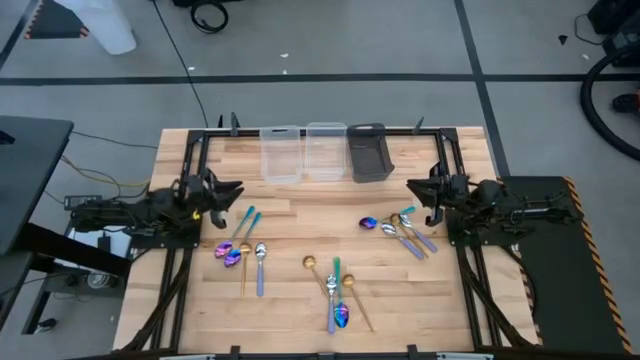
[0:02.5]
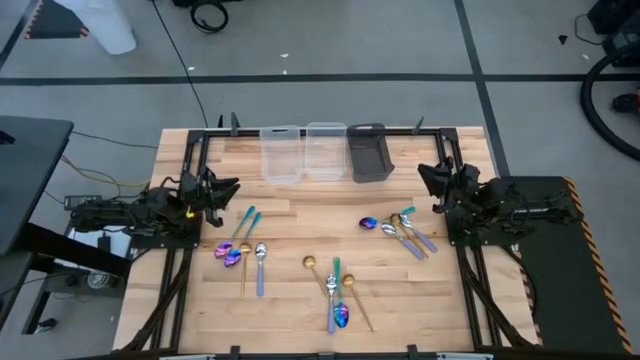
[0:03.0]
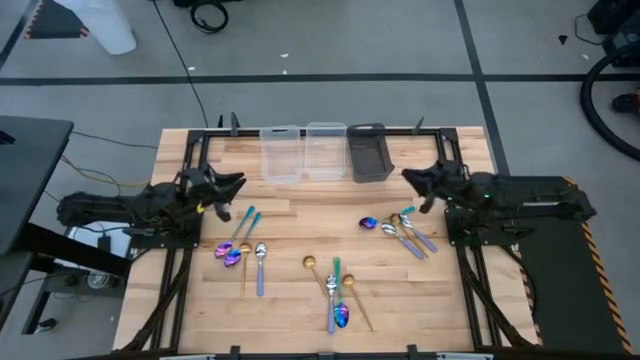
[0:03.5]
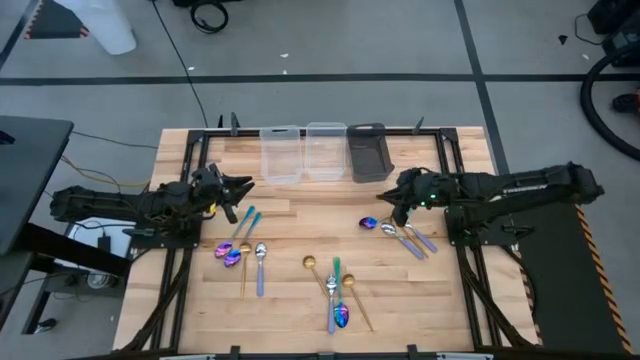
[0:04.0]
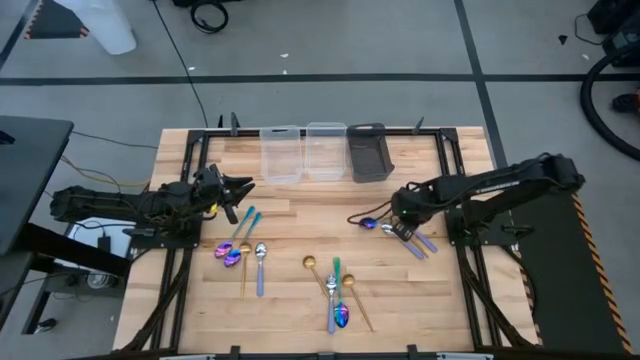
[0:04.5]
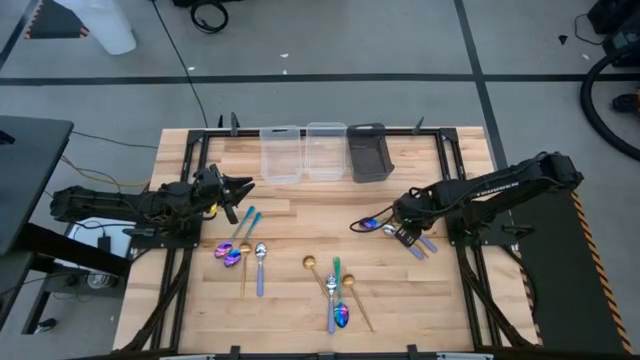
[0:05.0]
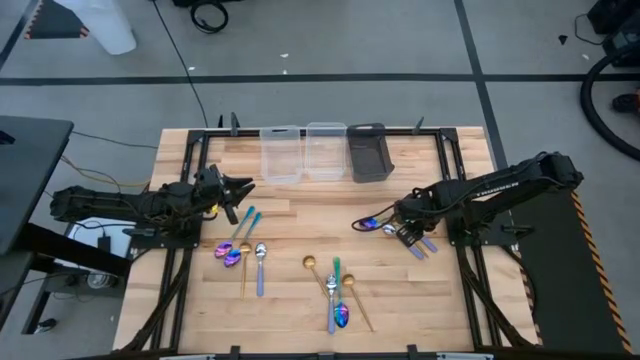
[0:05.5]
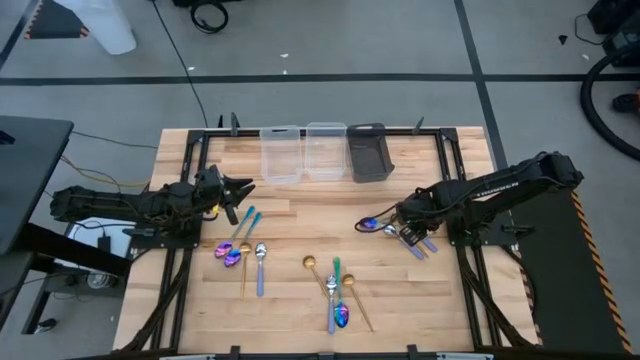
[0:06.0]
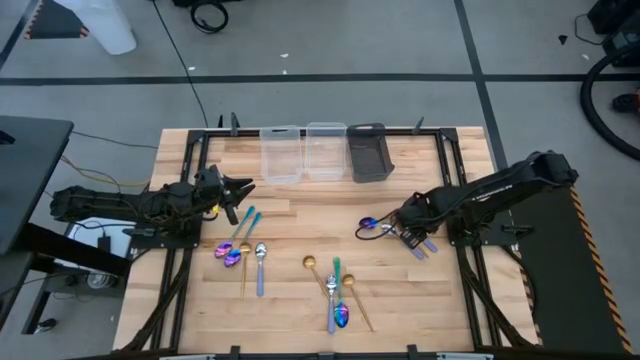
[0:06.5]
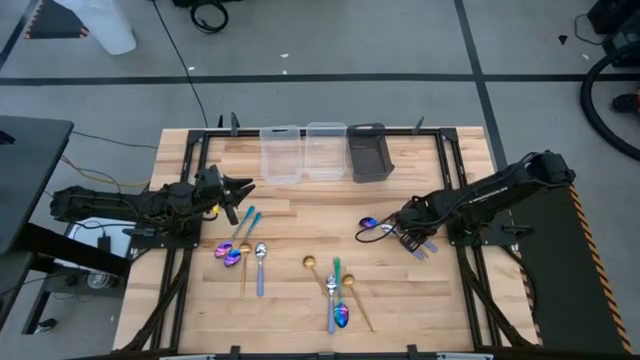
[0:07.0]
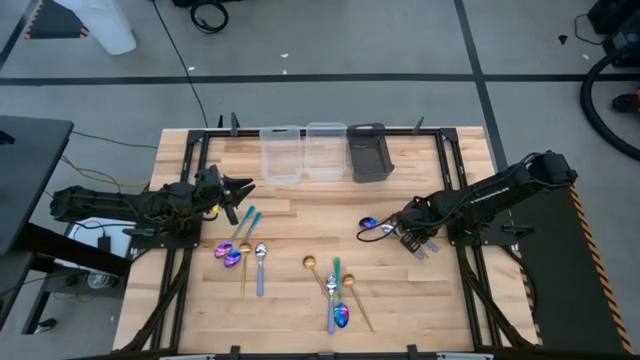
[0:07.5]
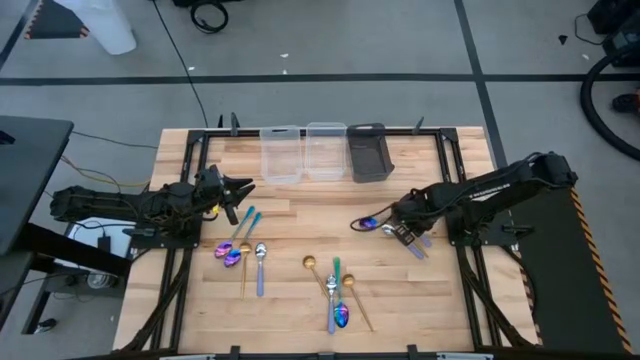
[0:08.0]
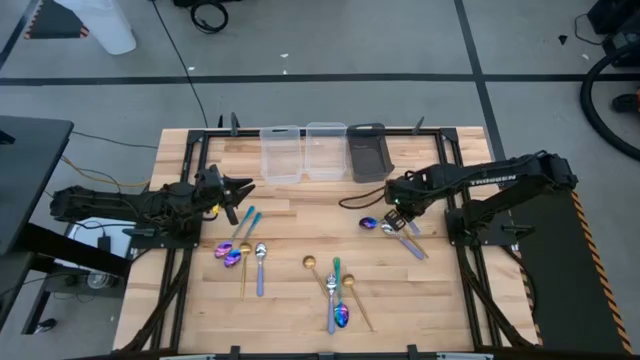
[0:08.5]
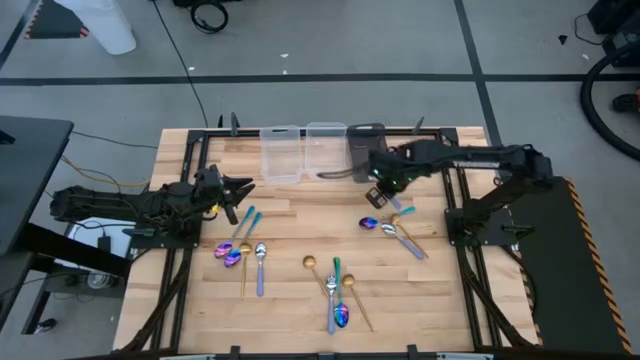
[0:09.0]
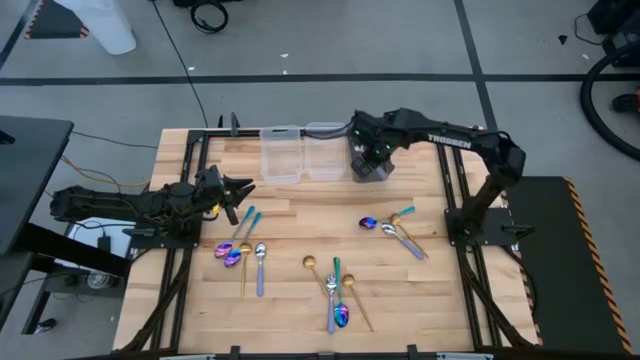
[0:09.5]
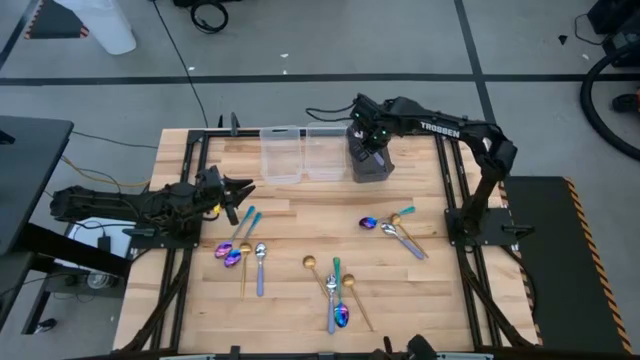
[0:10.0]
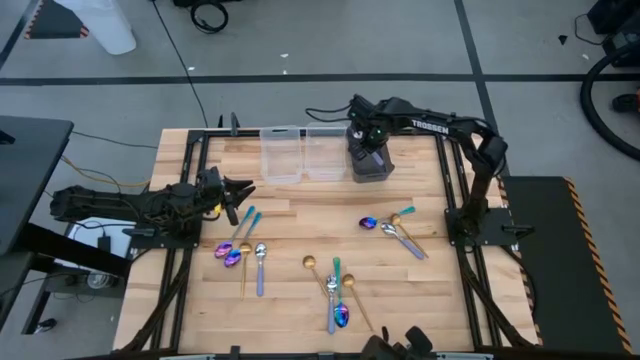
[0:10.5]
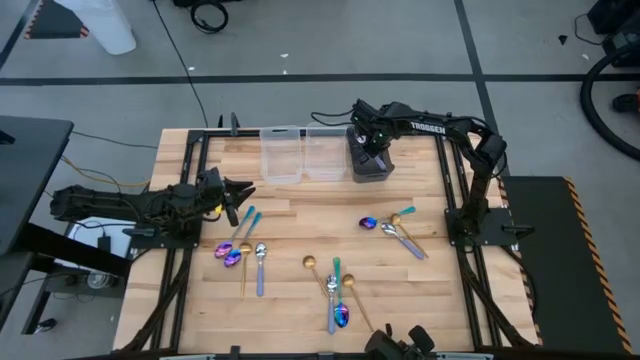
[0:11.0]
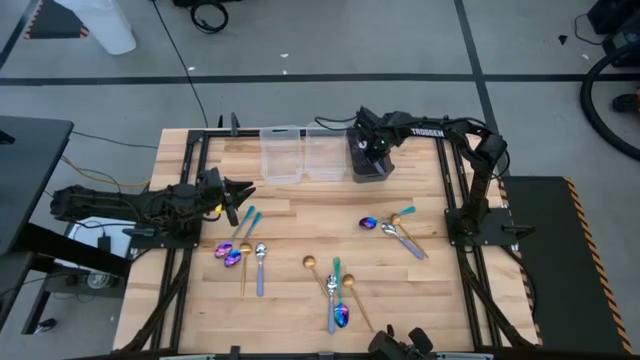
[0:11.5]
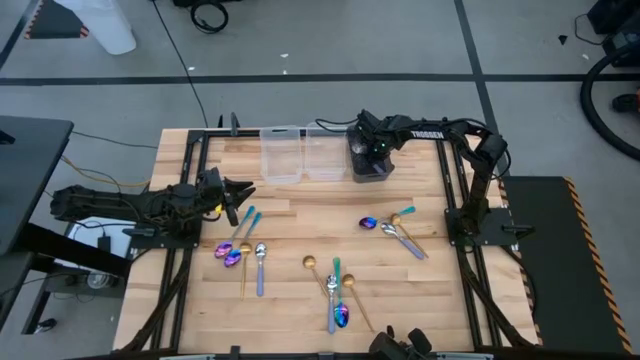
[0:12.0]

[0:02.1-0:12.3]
Task: Sort silverware by color (type)
Put the violet spoon into the black bin

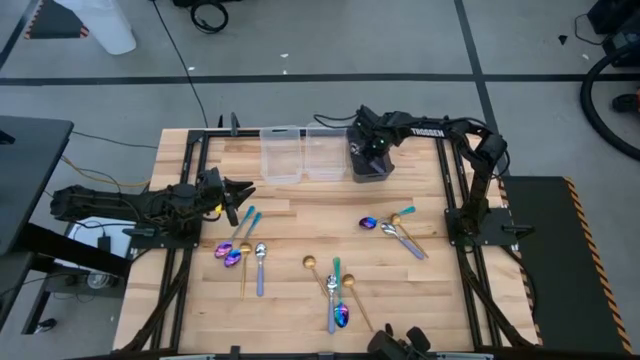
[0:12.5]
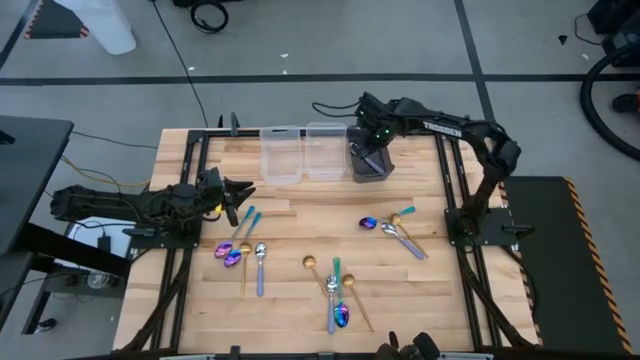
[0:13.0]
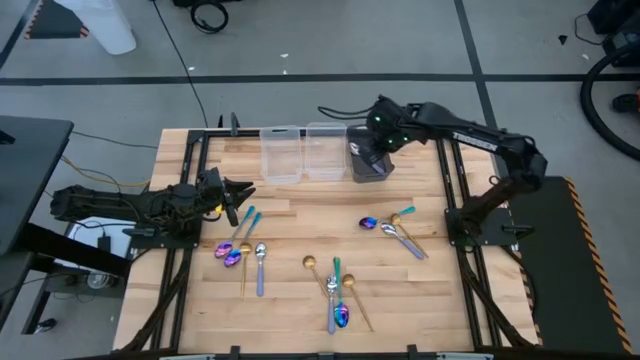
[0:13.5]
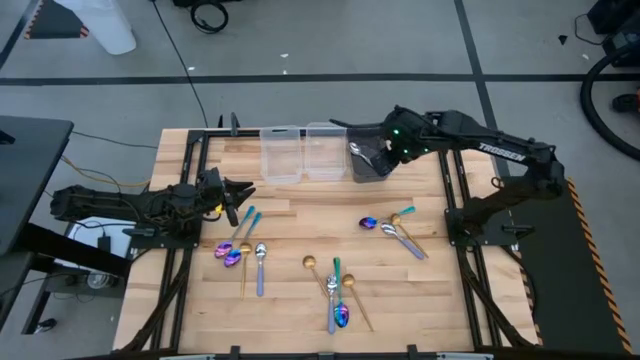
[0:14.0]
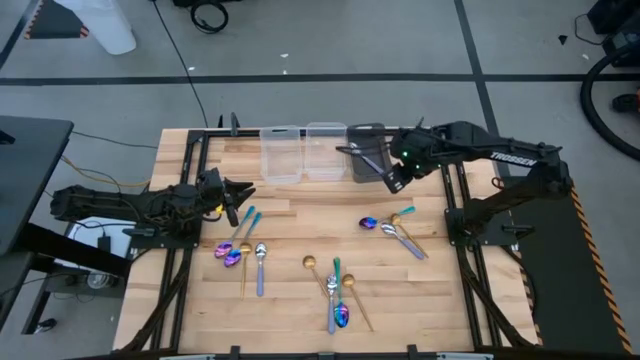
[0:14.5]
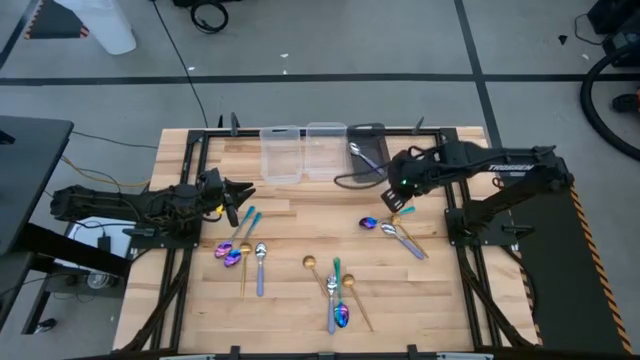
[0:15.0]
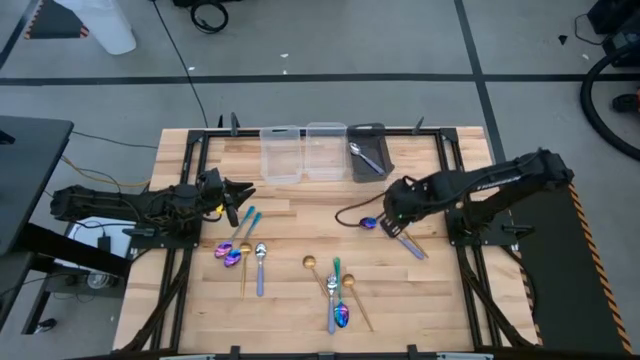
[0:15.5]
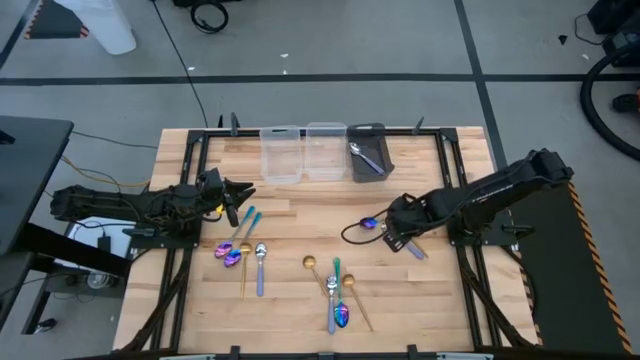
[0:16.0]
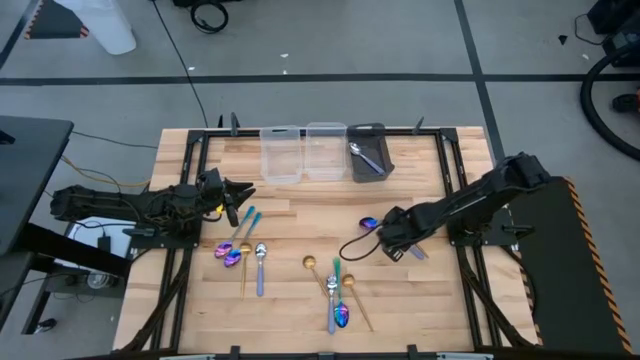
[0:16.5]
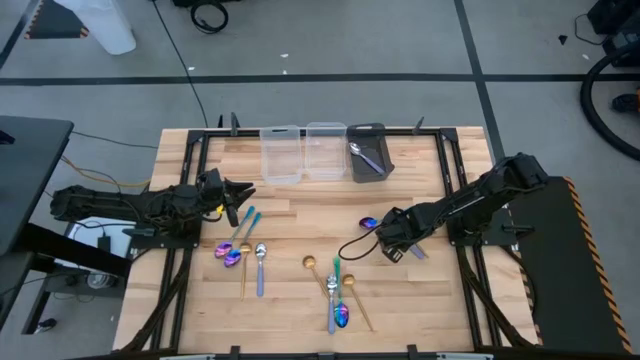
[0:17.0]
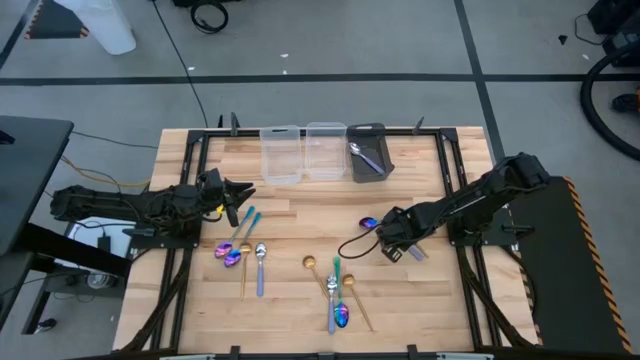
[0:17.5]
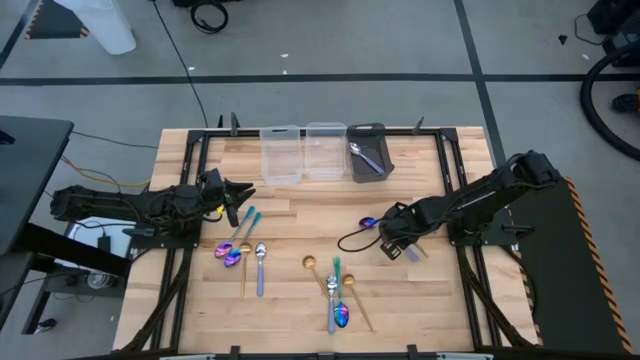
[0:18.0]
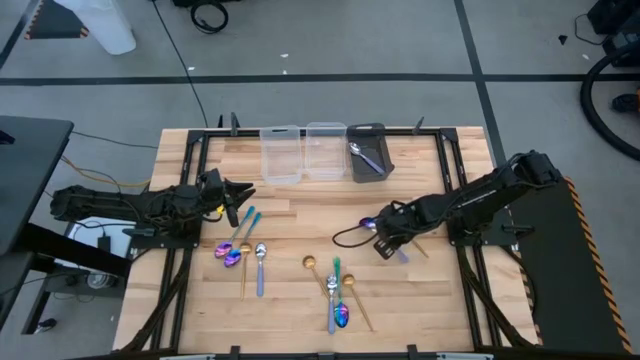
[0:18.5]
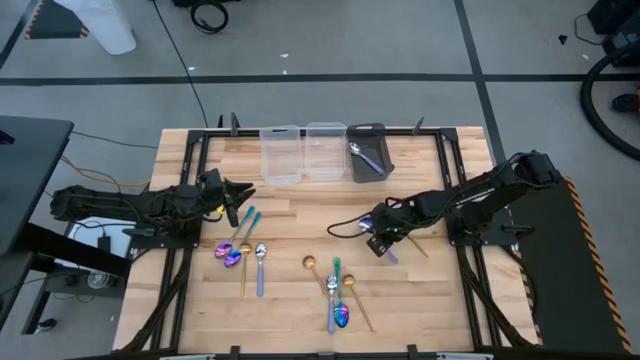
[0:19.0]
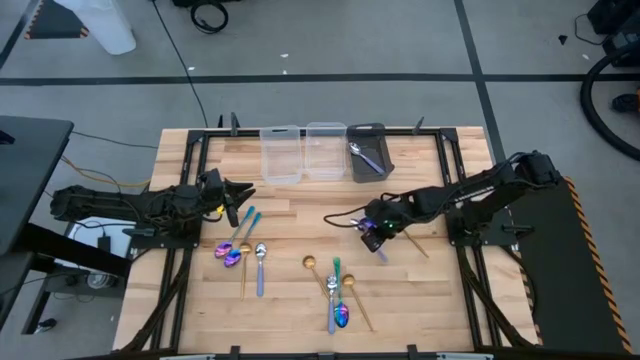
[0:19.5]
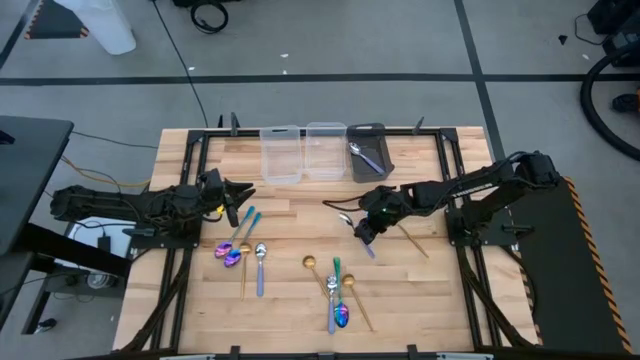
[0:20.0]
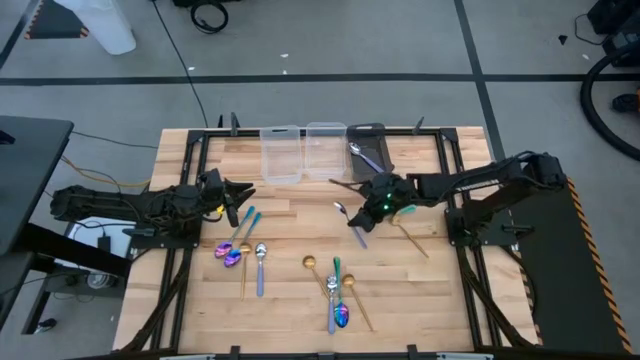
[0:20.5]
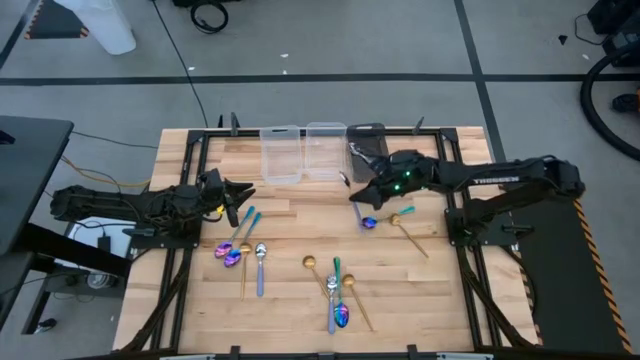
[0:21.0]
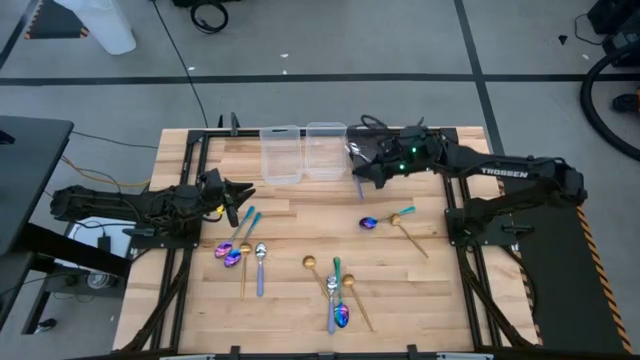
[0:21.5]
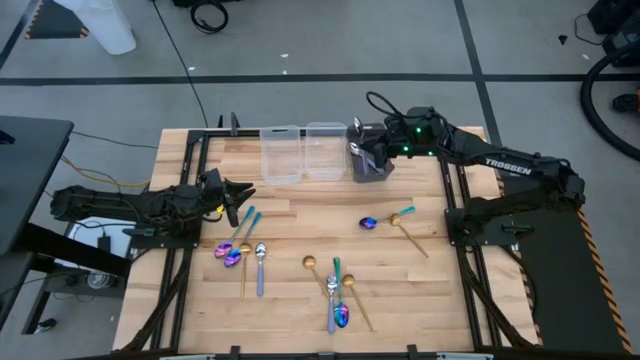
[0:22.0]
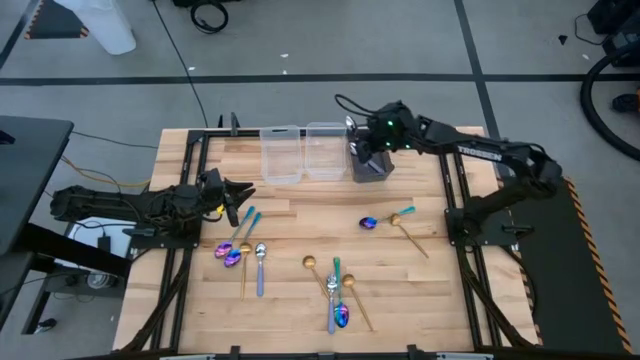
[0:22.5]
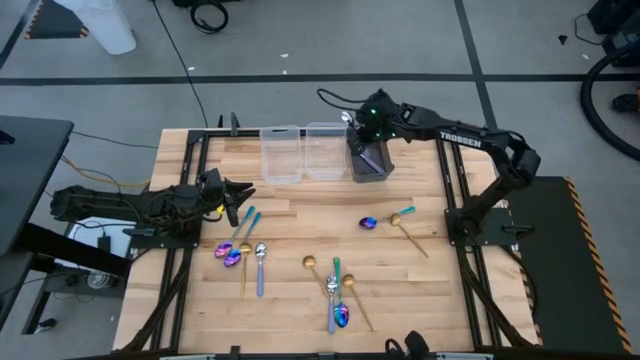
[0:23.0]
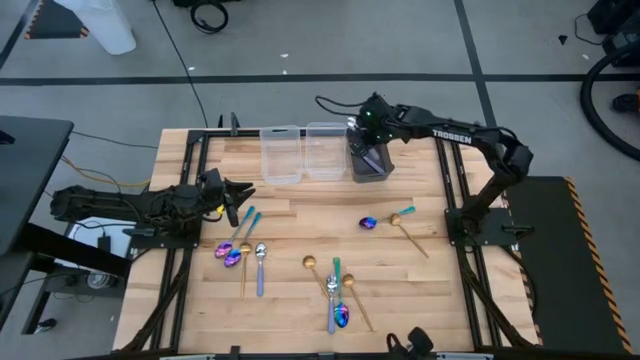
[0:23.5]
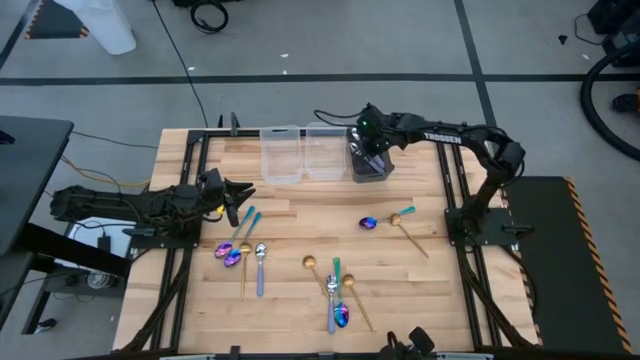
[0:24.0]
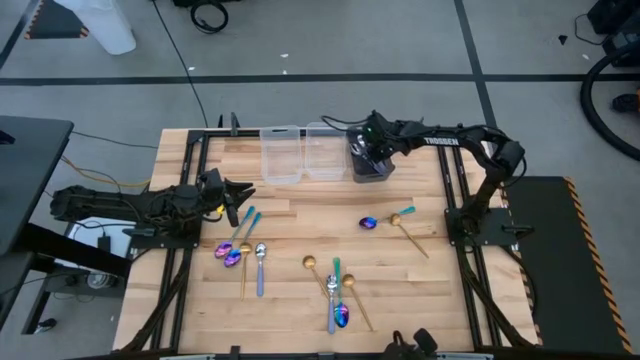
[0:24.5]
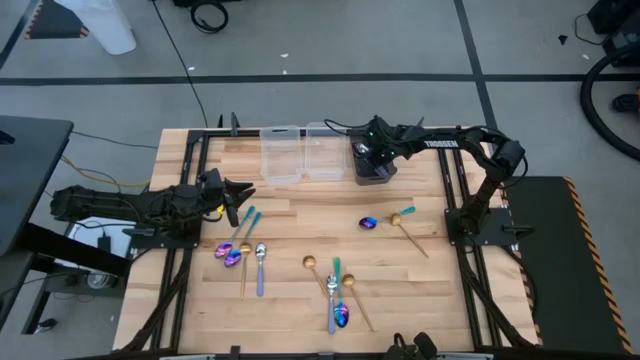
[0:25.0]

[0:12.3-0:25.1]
Put the violet spoon into the black bin
